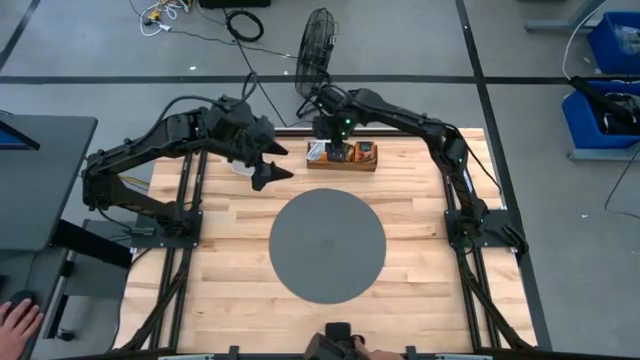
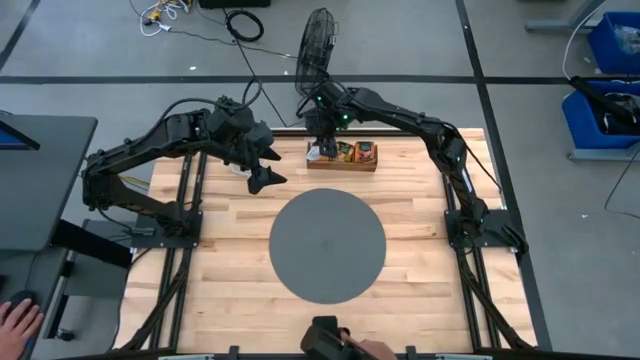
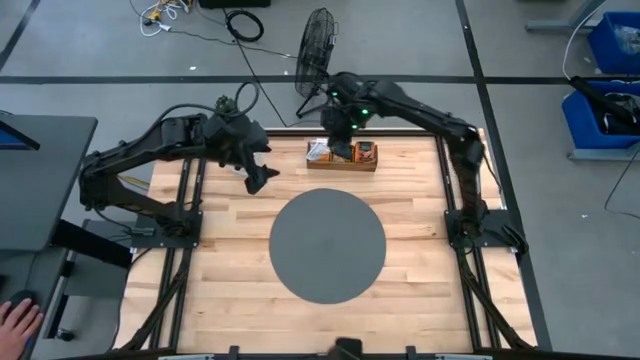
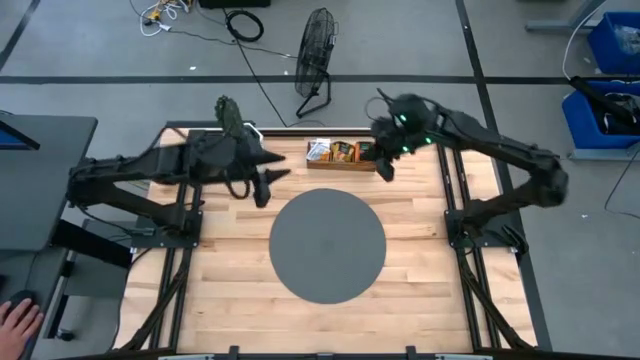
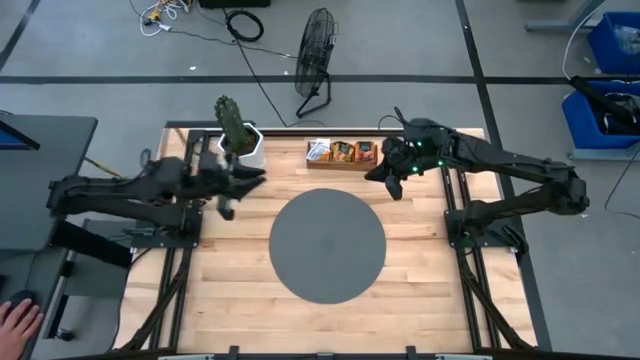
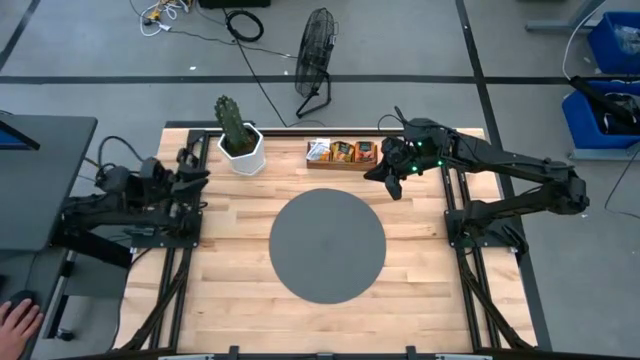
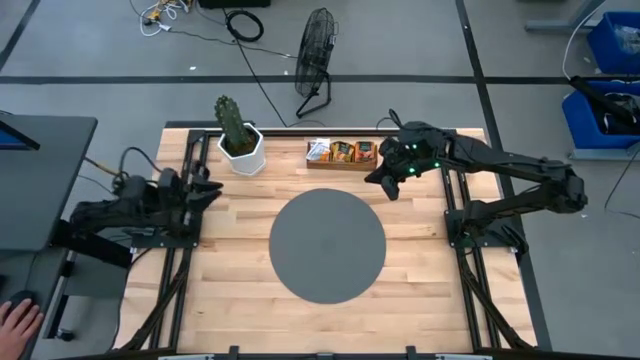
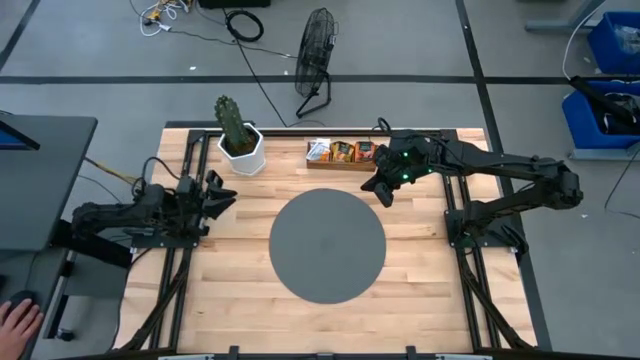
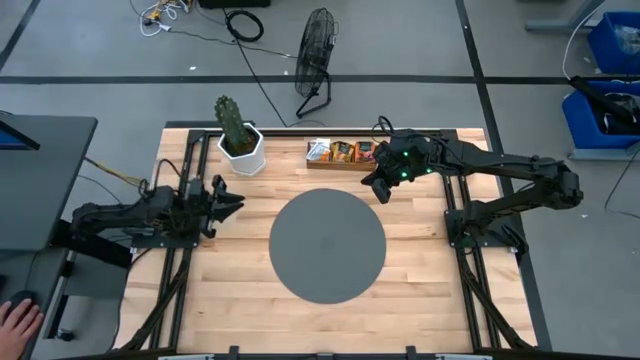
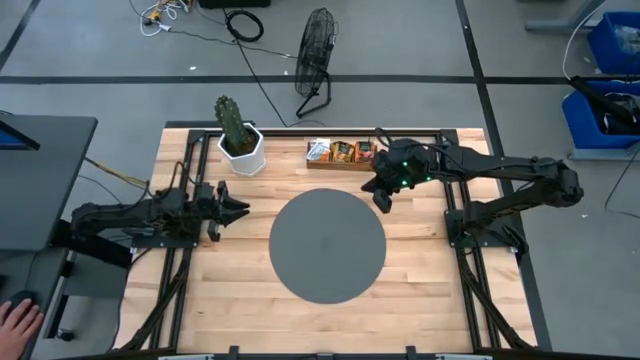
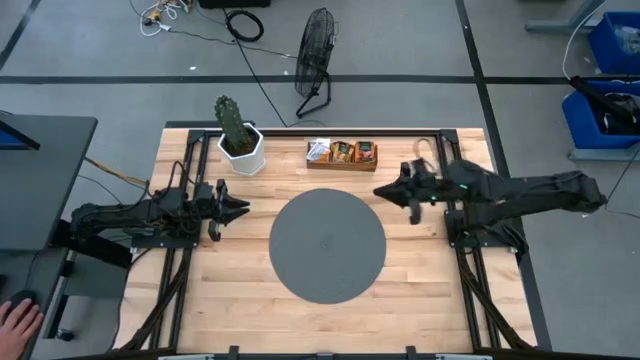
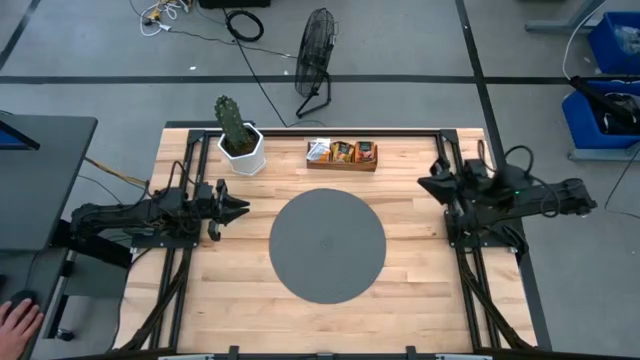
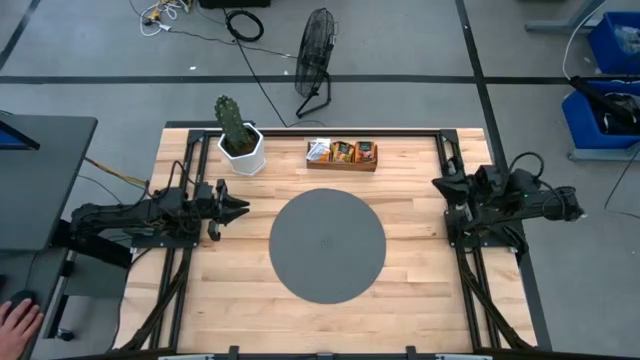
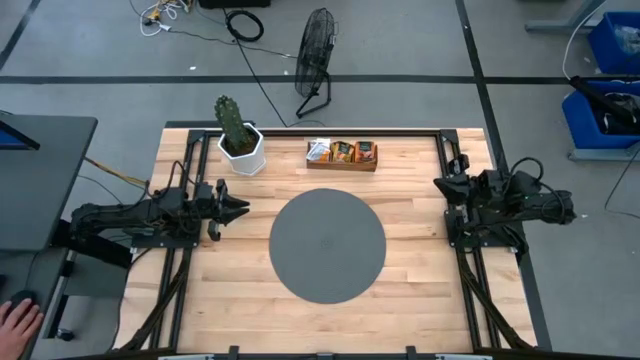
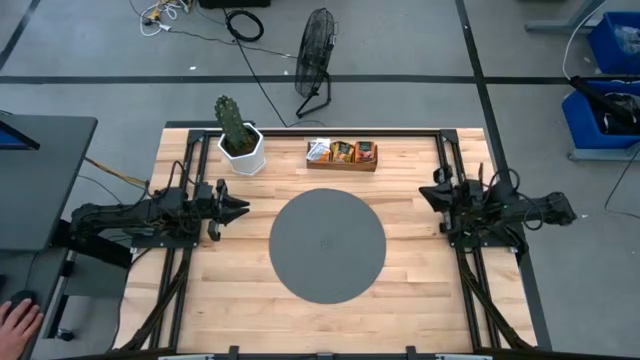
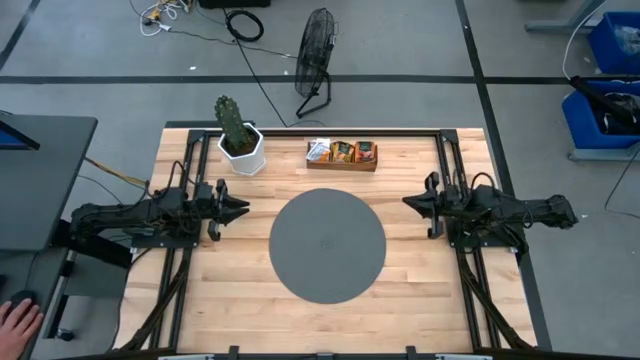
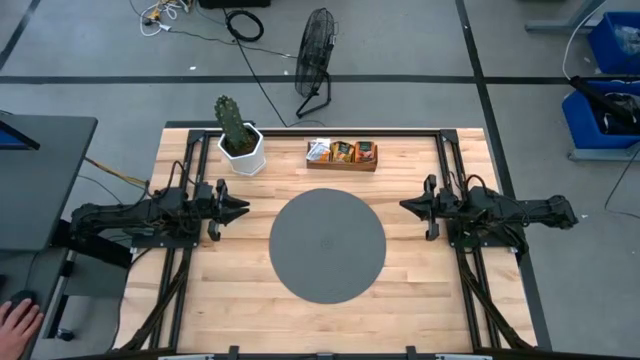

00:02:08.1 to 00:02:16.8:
Task: Pick & Place Tea
Return to Home Position

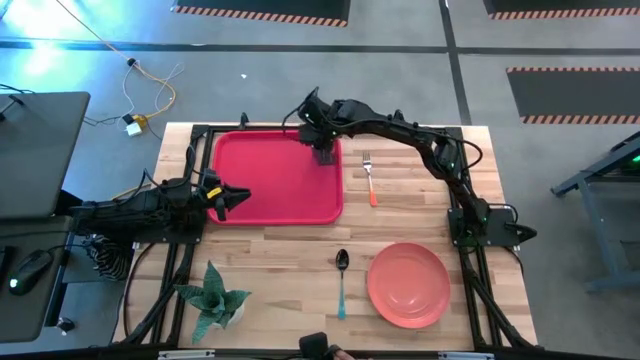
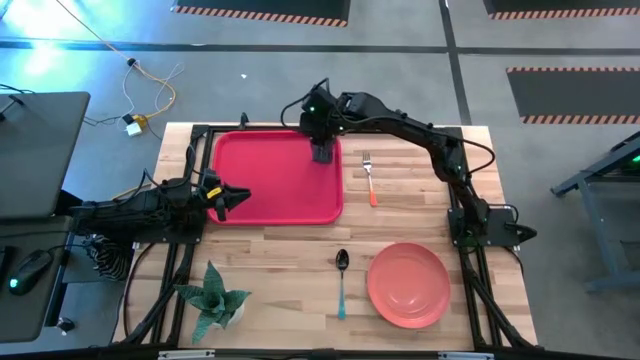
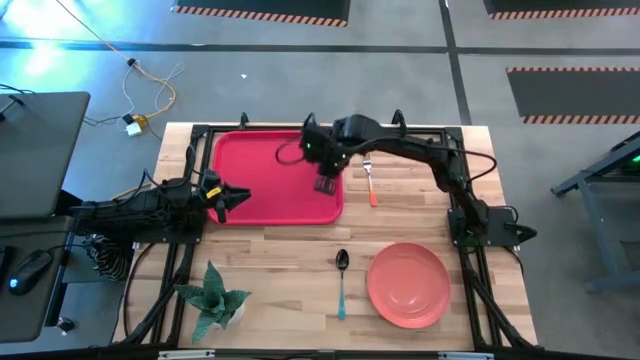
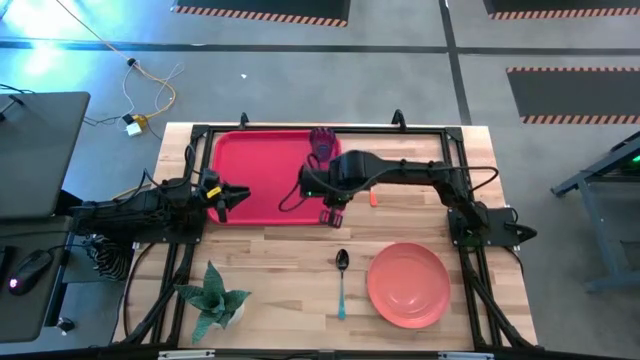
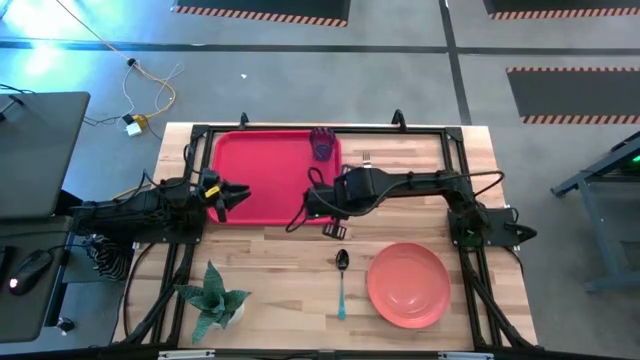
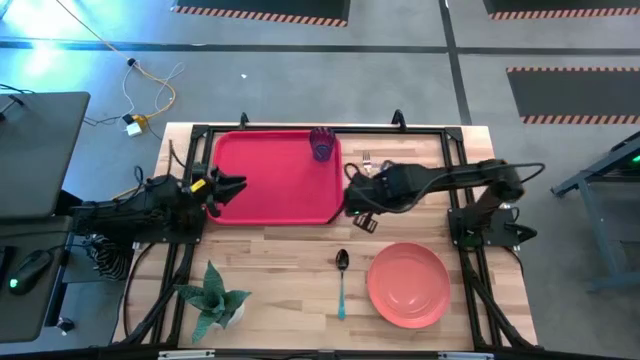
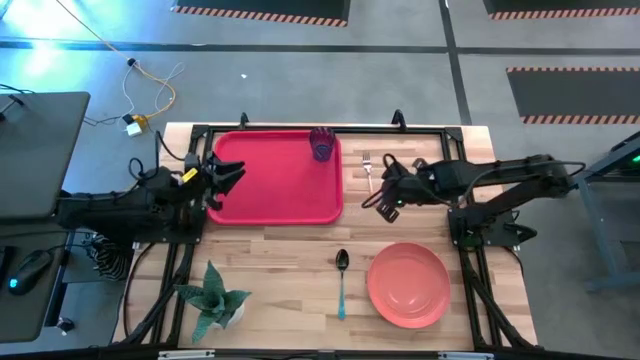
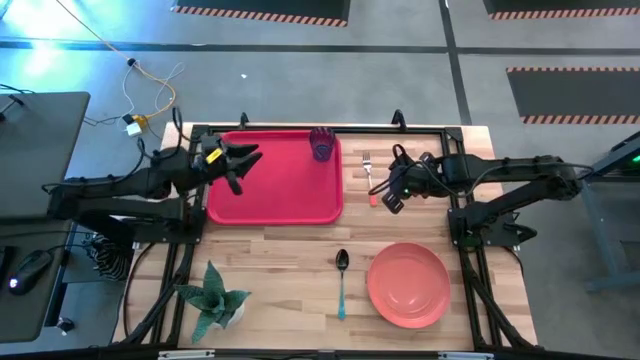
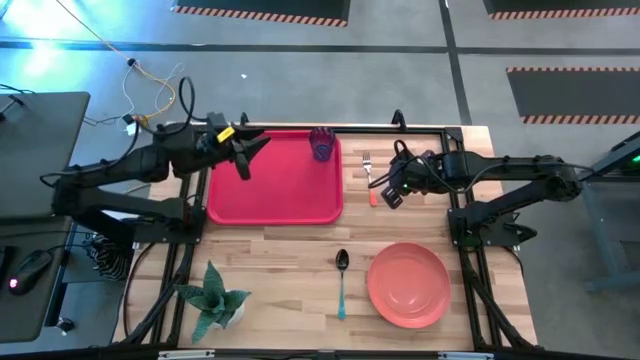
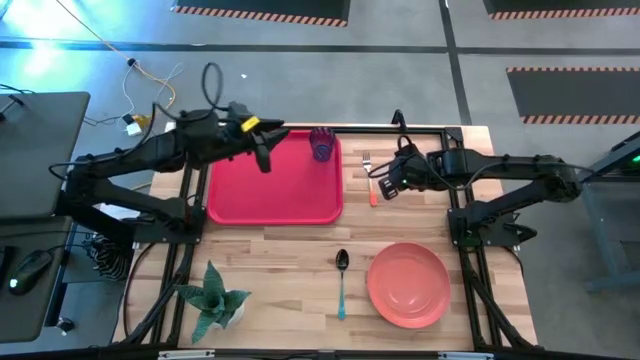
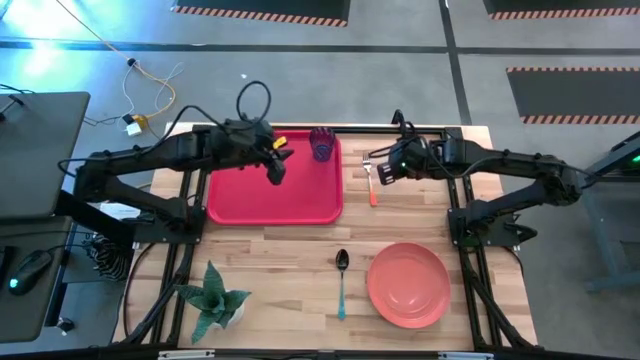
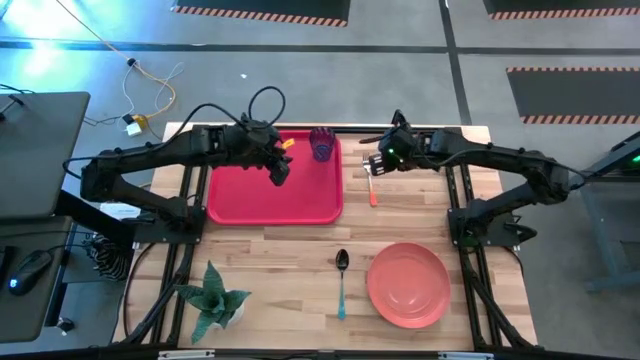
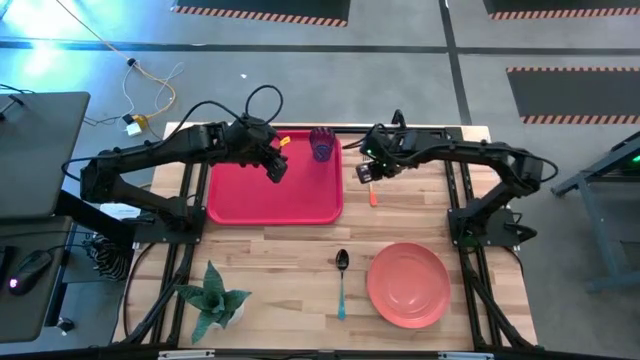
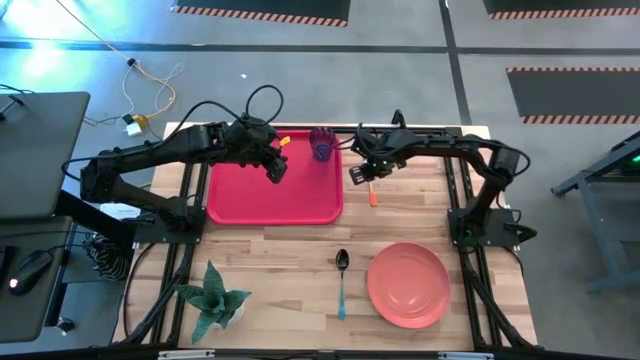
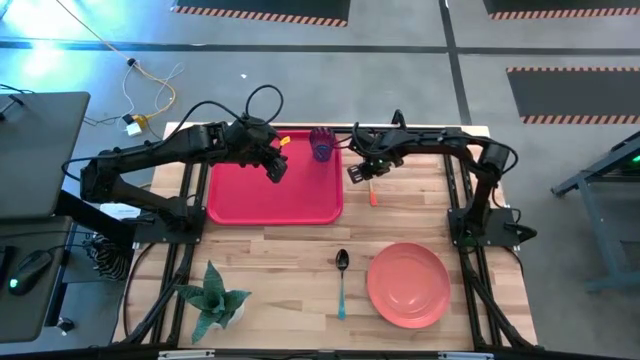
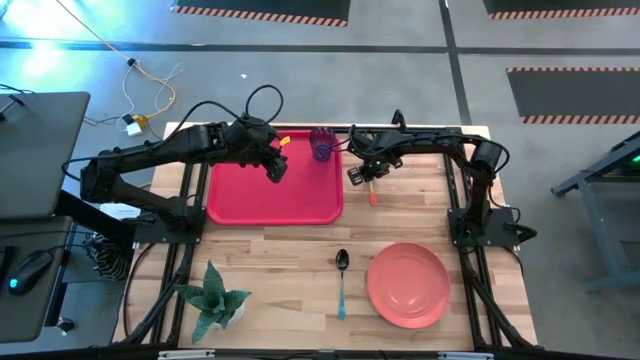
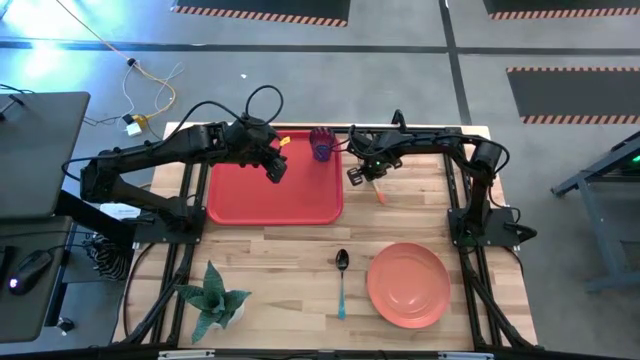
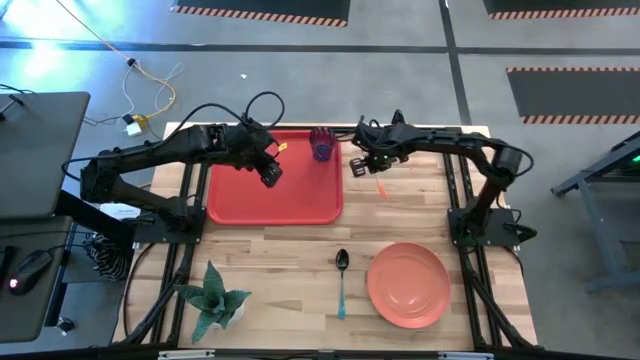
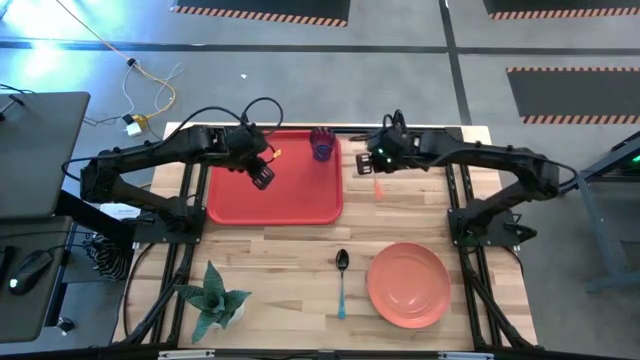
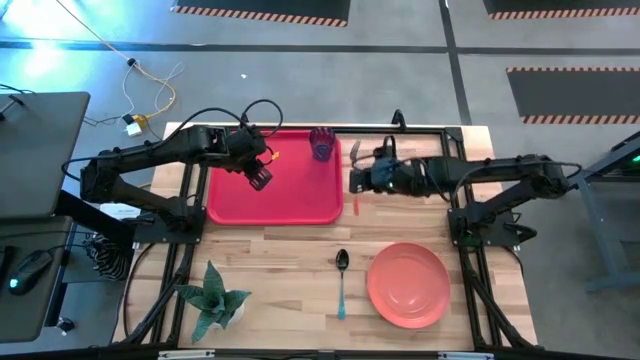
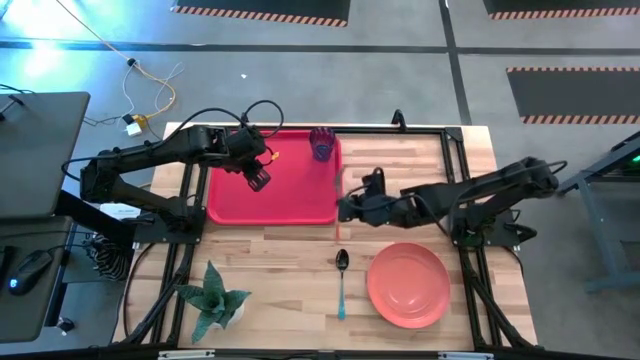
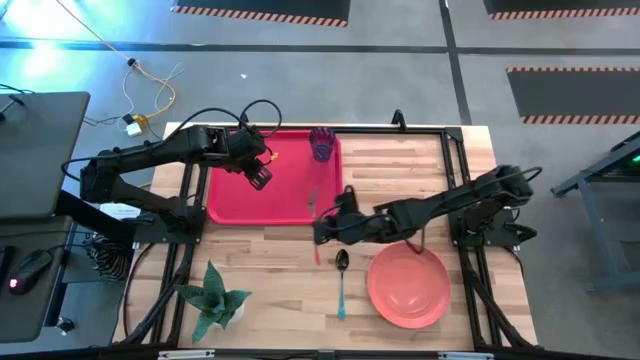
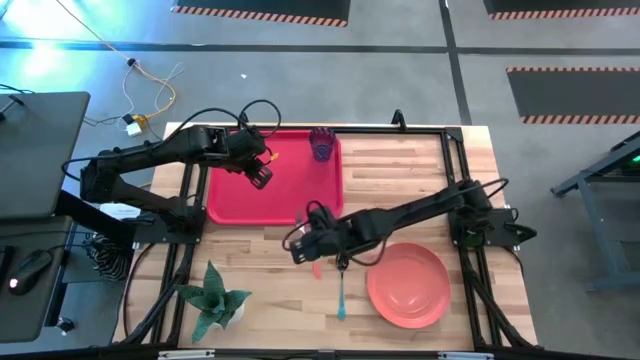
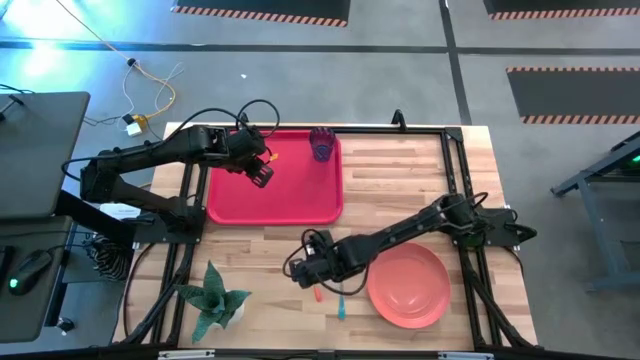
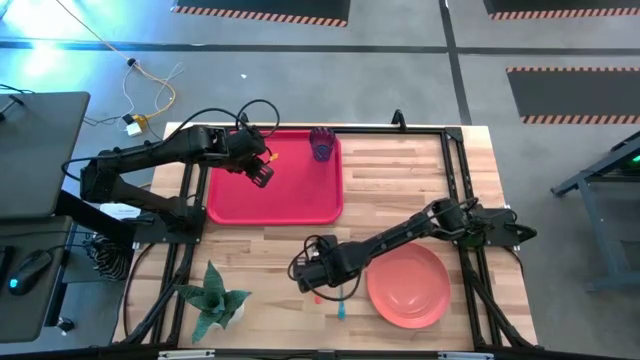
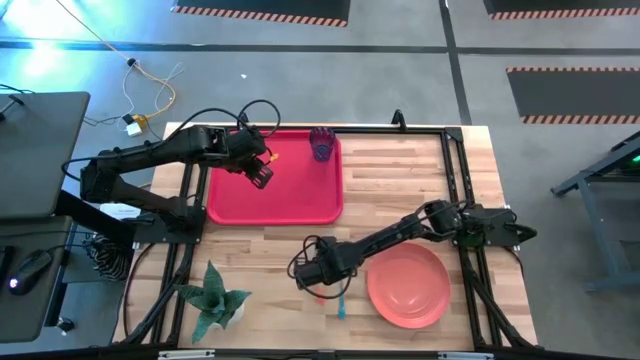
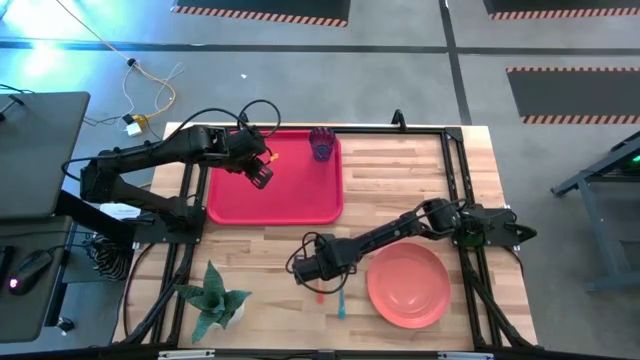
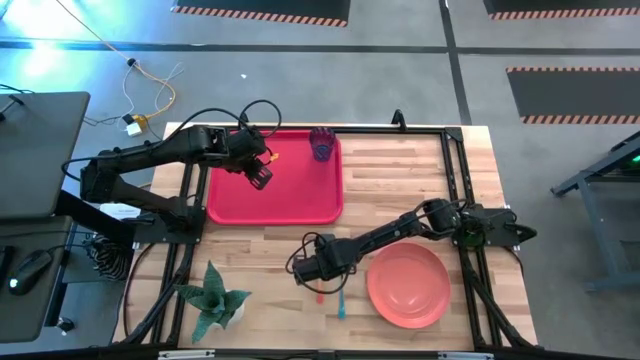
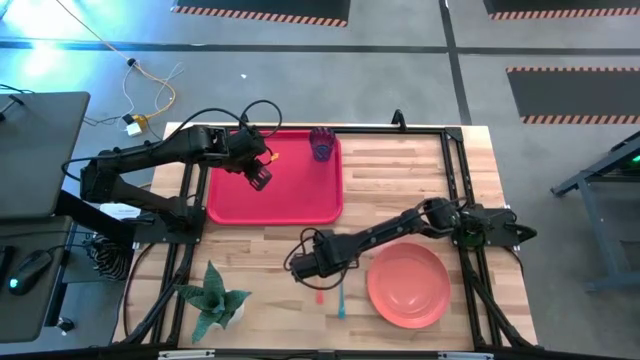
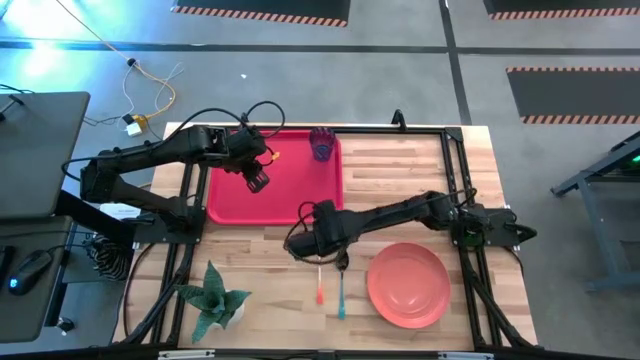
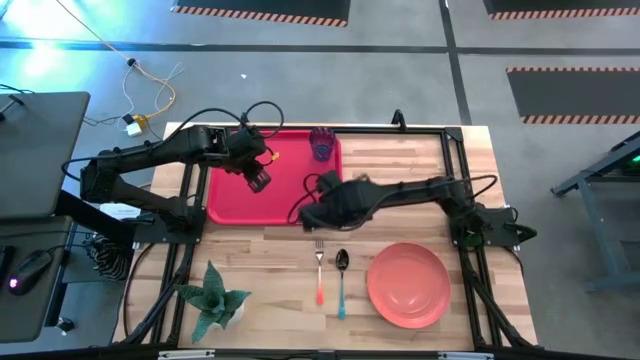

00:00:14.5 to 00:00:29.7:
Task: Pick and place plate/cup/fork/spoon on tray
Put the orange fork on the left of the red serving tray
